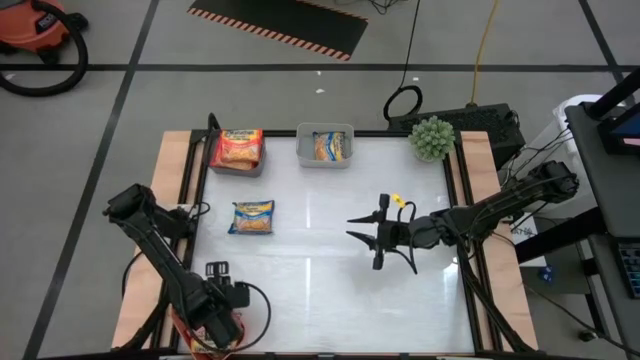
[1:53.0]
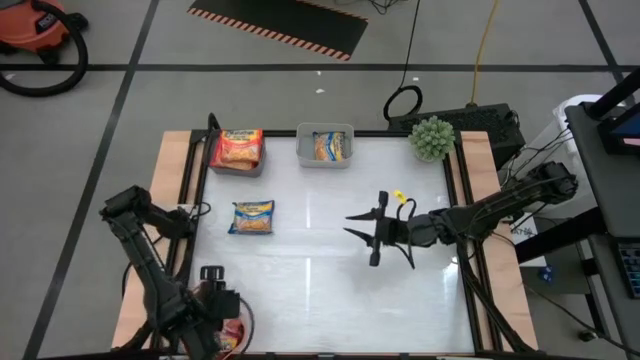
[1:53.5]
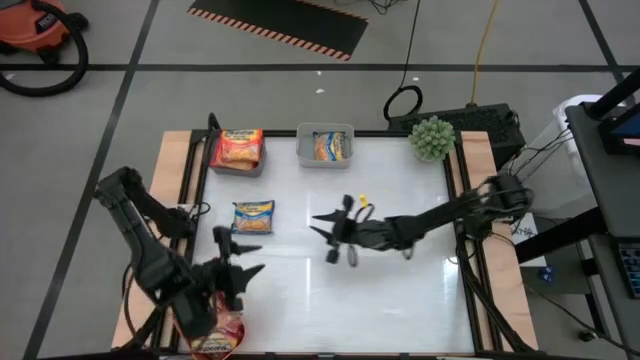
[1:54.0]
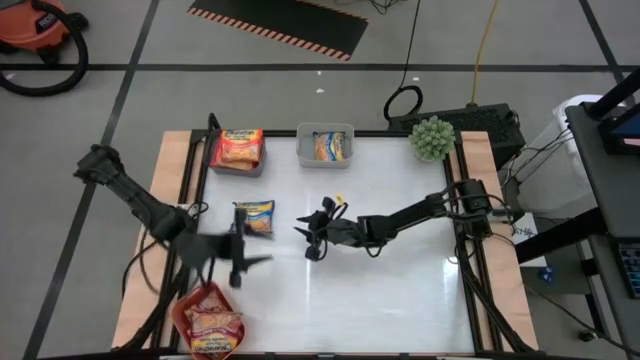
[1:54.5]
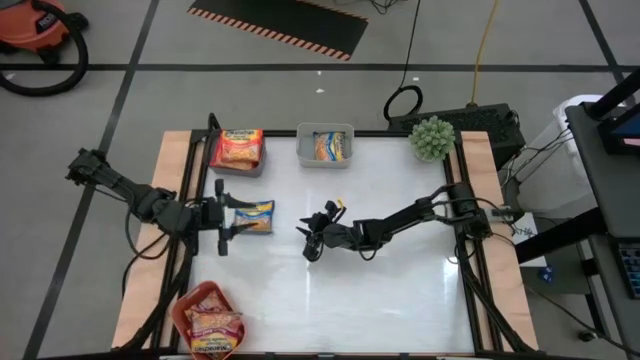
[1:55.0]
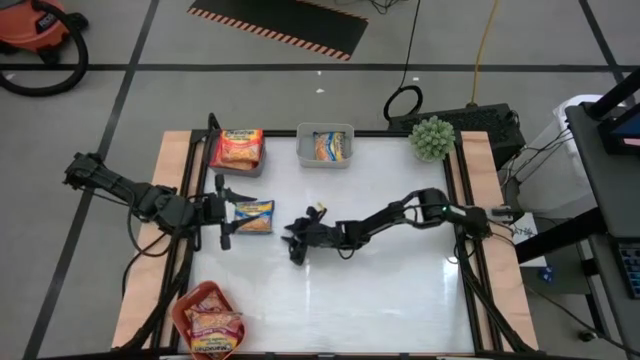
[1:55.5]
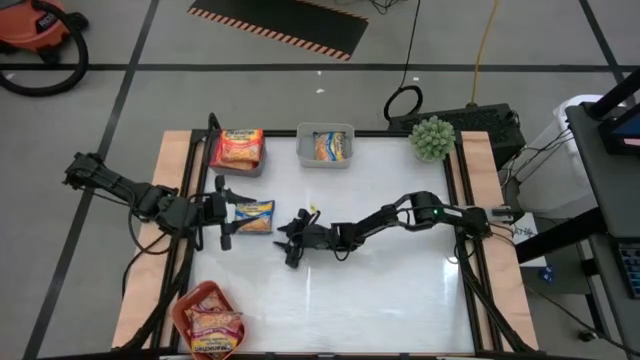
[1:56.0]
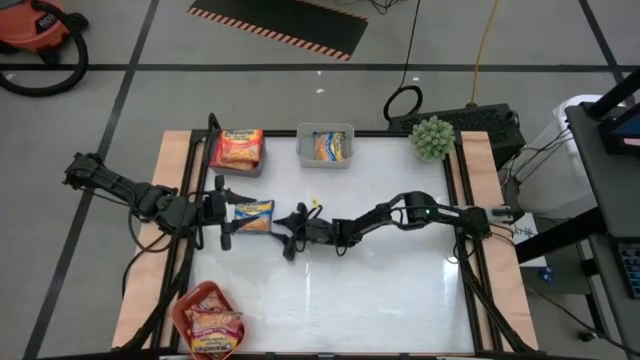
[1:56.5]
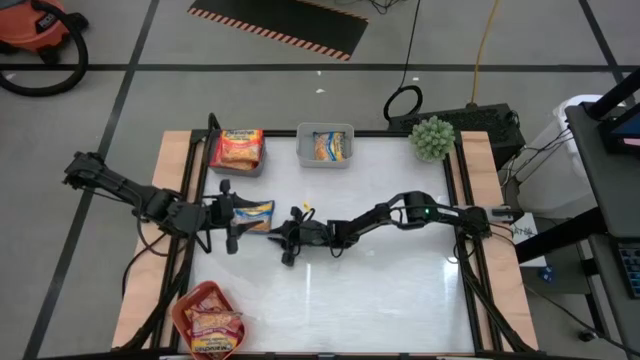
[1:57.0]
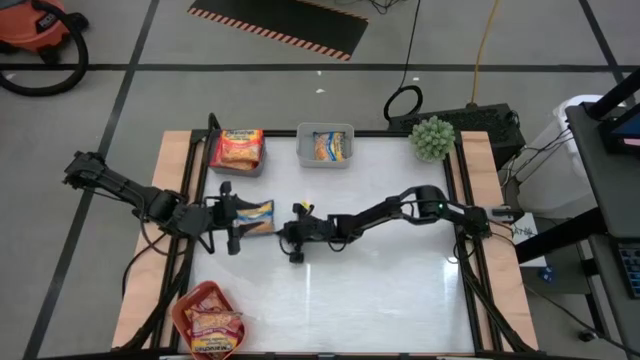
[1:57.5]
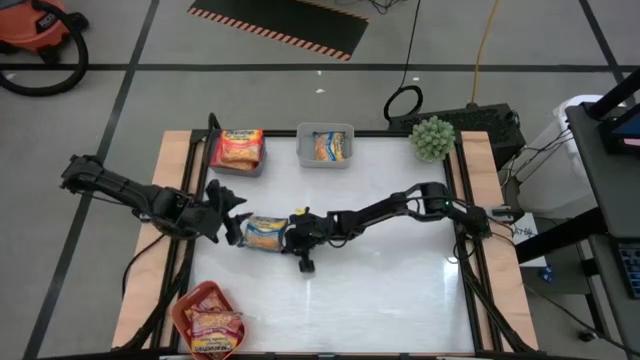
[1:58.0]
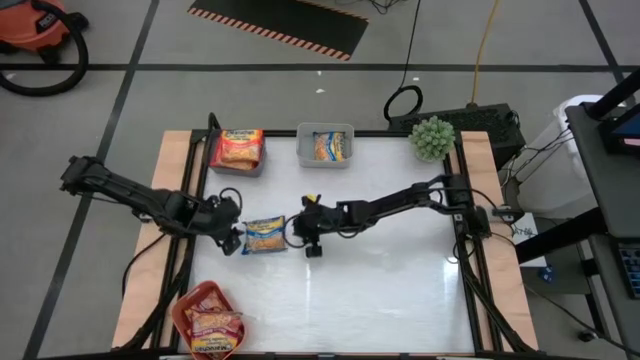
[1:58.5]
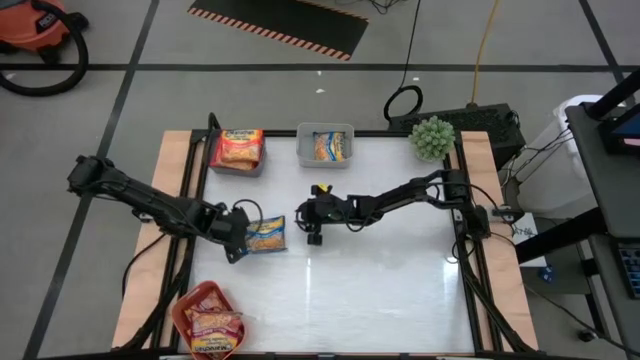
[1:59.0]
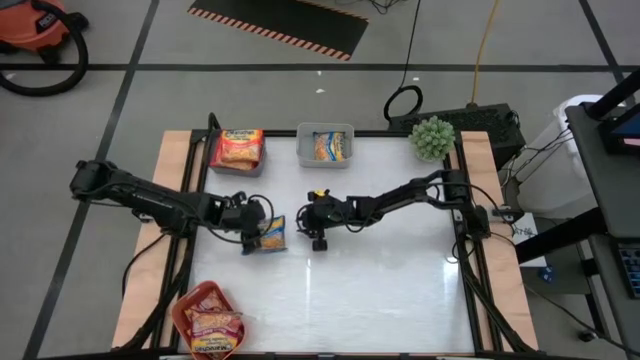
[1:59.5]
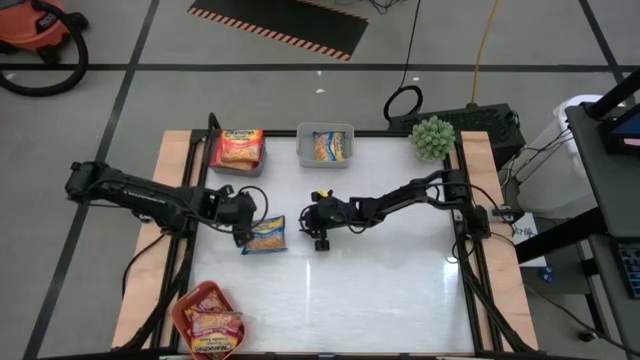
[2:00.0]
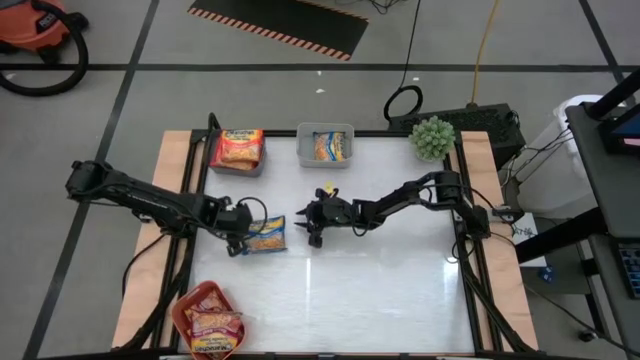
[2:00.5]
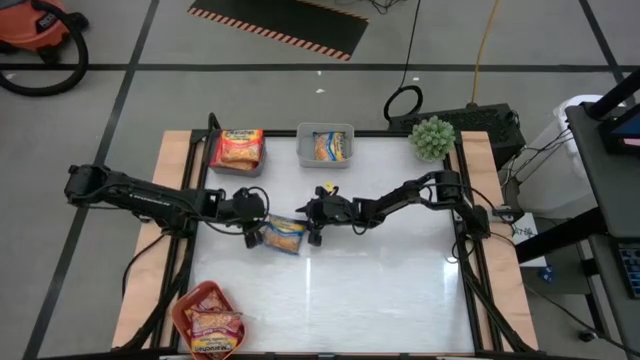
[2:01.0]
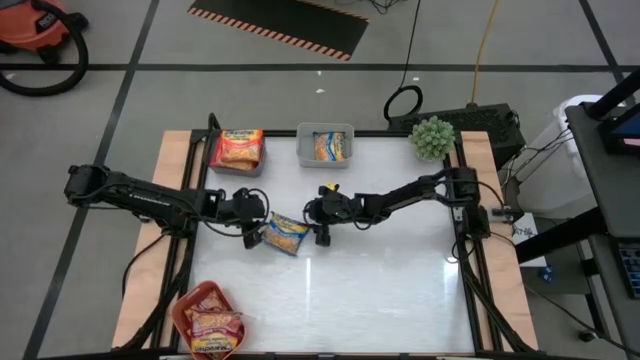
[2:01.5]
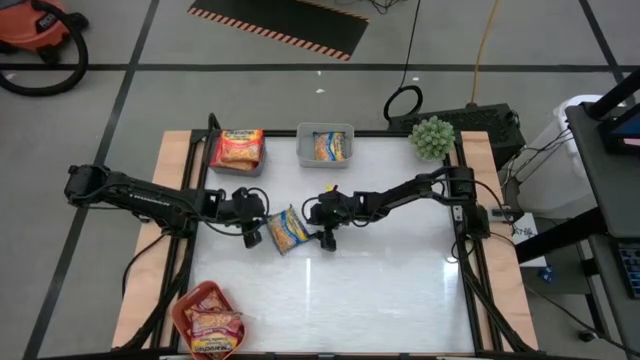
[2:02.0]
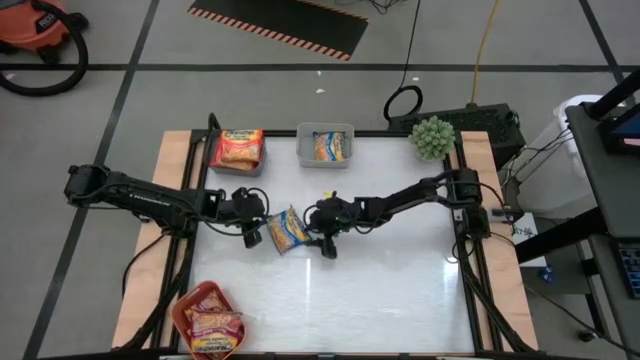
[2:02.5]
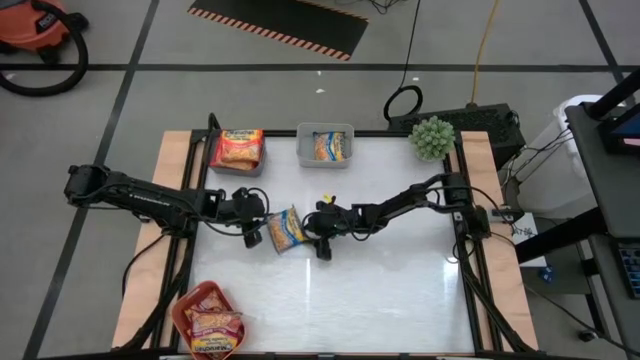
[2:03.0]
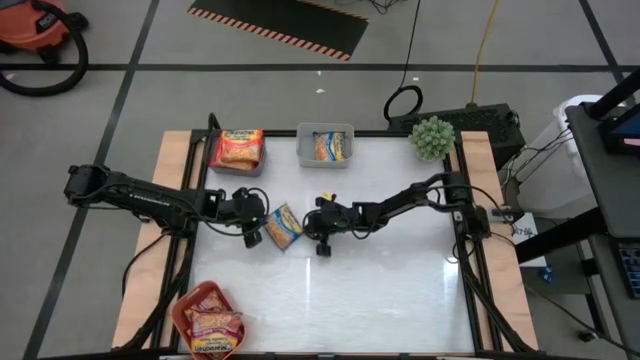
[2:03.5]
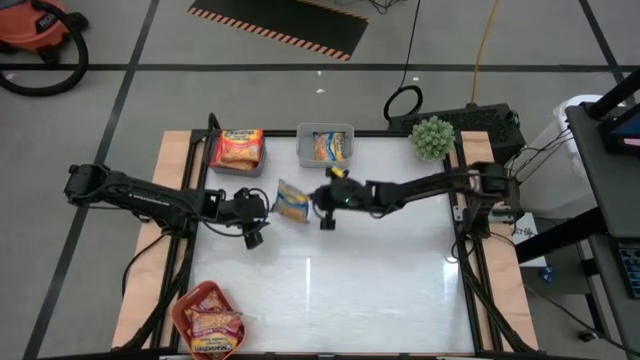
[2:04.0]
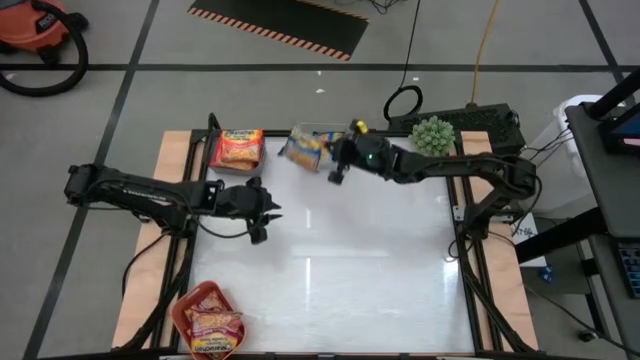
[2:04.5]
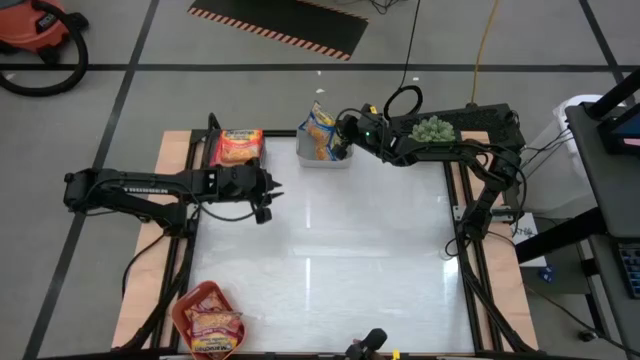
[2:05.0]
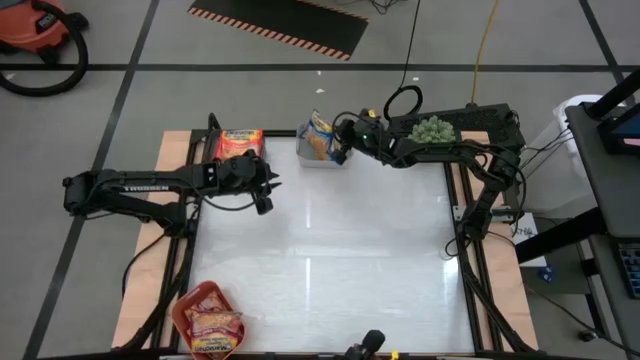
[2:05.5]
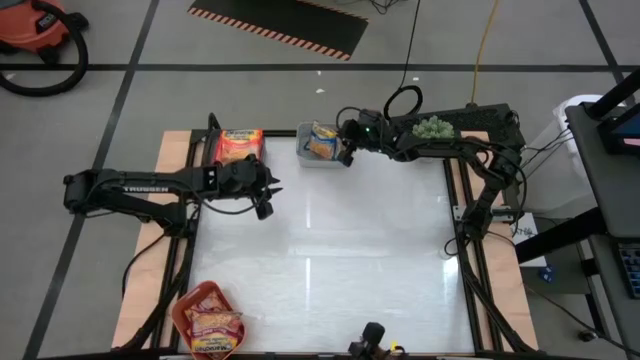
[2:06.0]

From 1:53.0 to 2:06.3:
Task: Sort Maruchan noodles
Put the blue noodle pack into the gray bin

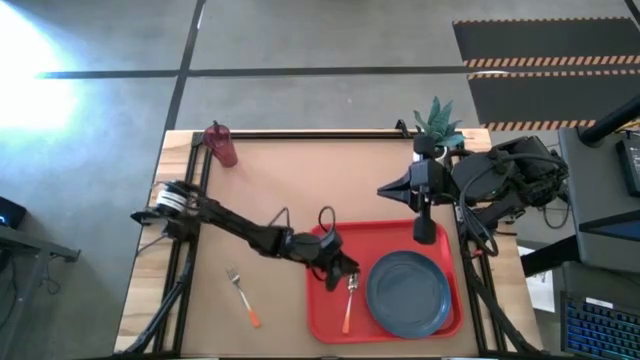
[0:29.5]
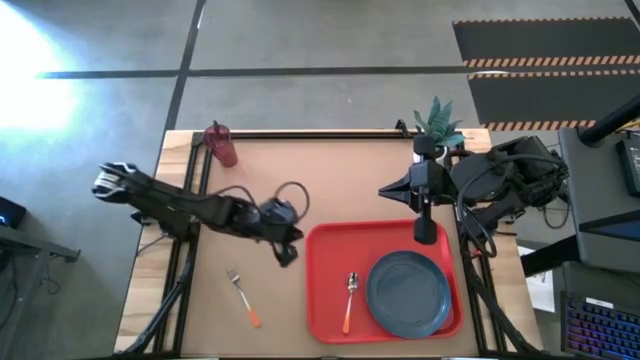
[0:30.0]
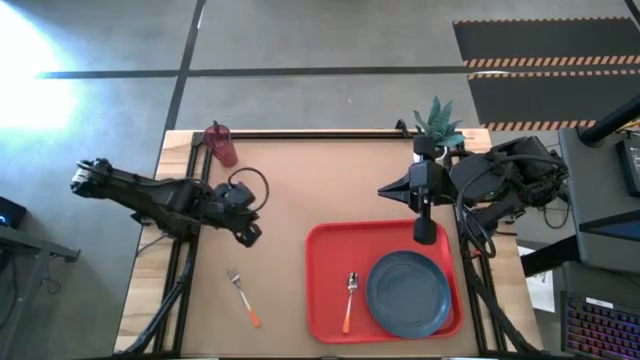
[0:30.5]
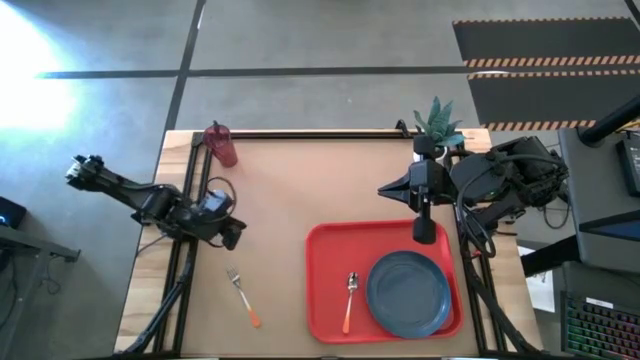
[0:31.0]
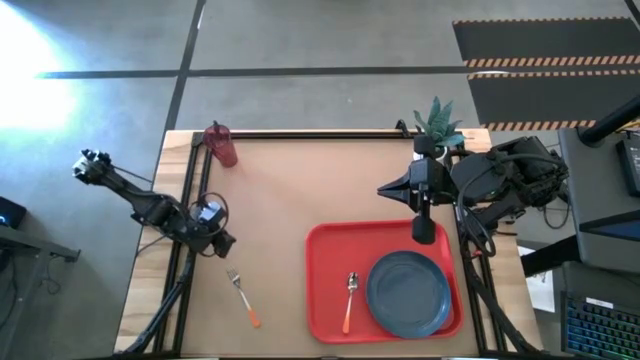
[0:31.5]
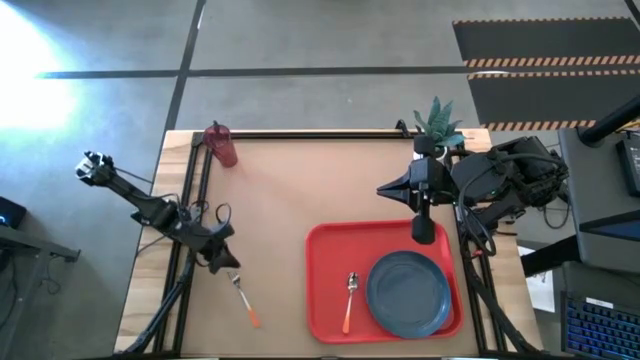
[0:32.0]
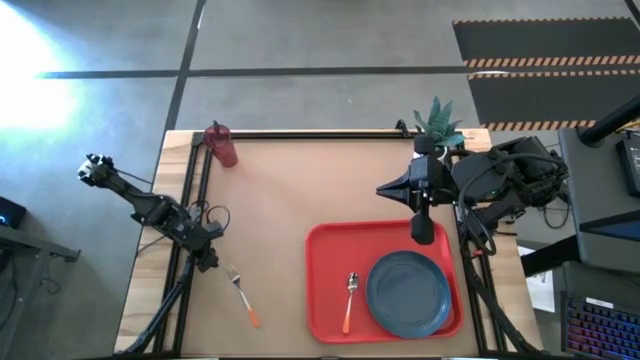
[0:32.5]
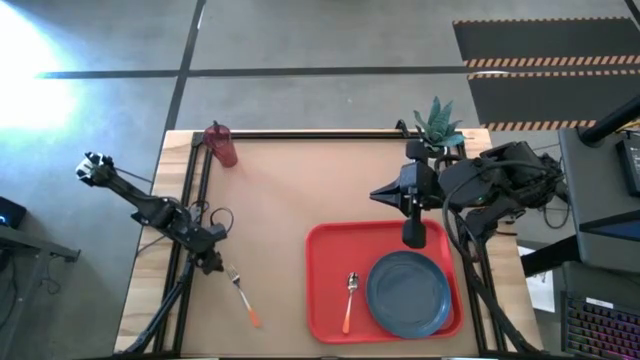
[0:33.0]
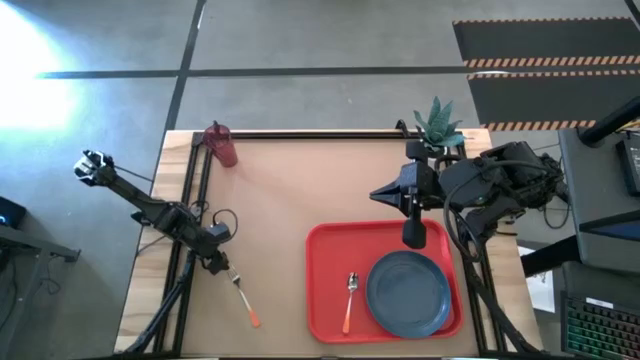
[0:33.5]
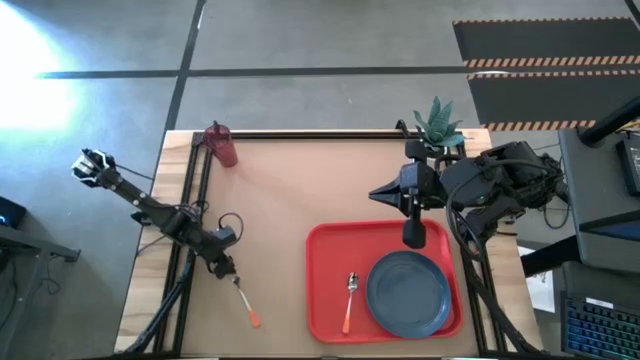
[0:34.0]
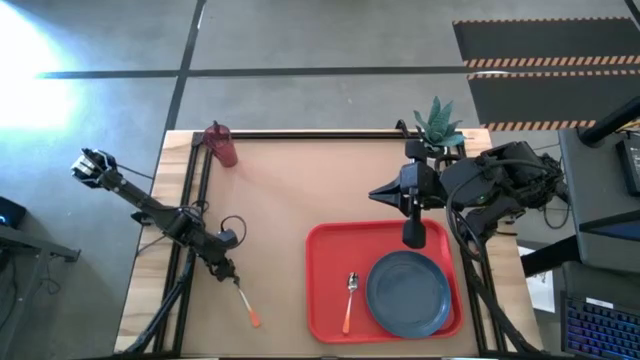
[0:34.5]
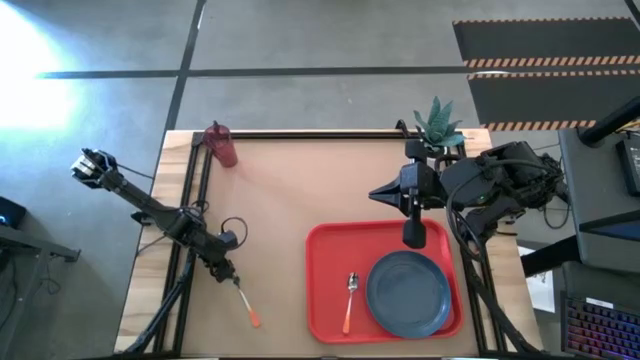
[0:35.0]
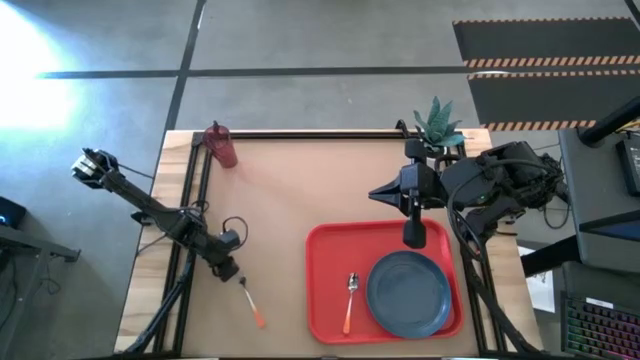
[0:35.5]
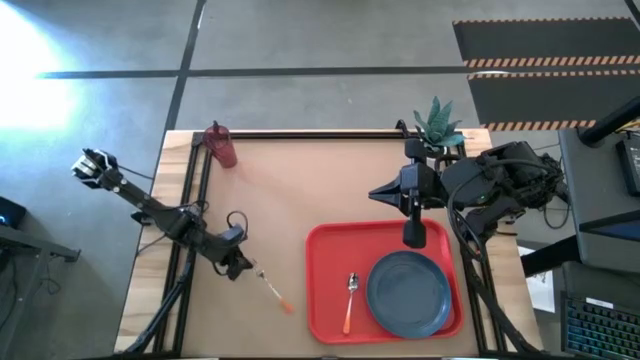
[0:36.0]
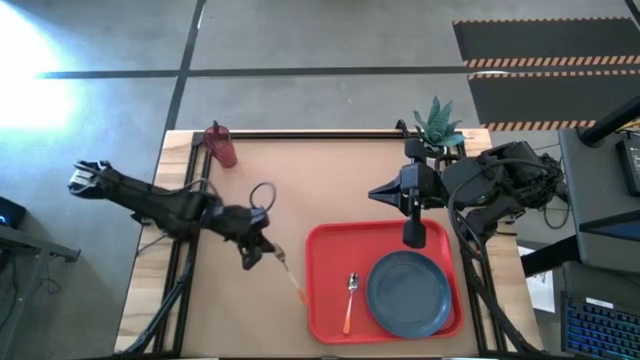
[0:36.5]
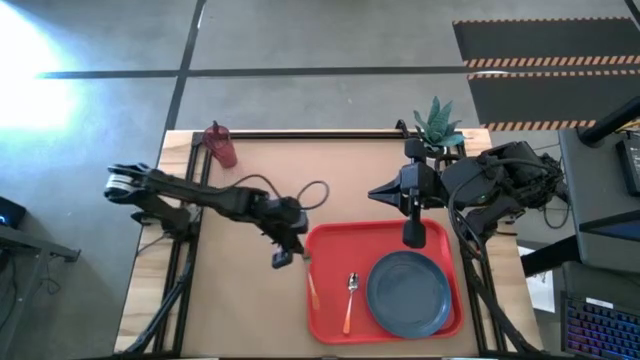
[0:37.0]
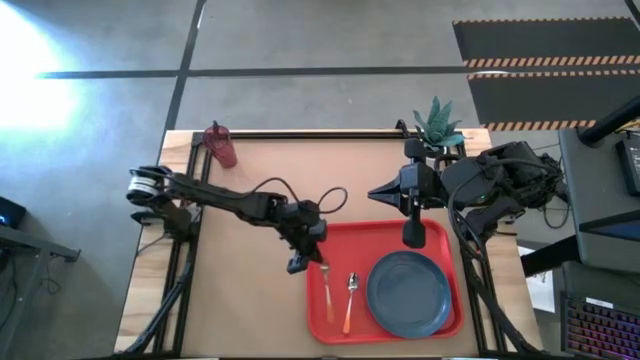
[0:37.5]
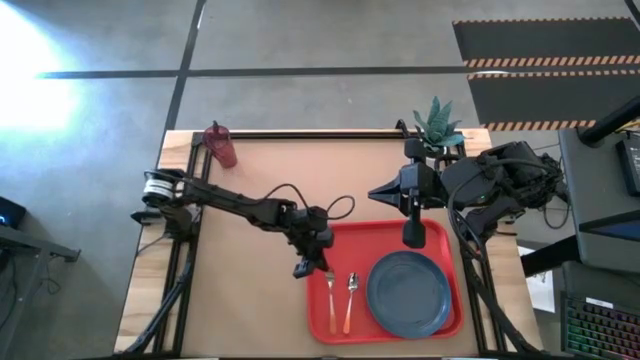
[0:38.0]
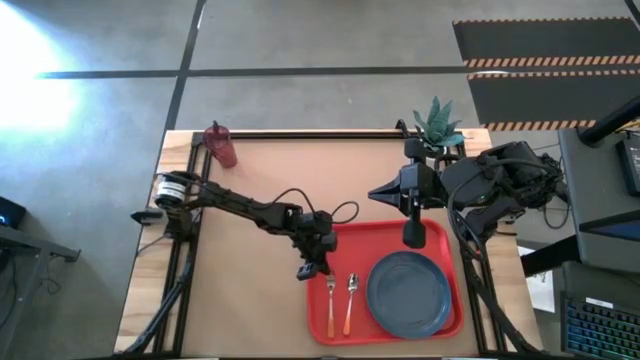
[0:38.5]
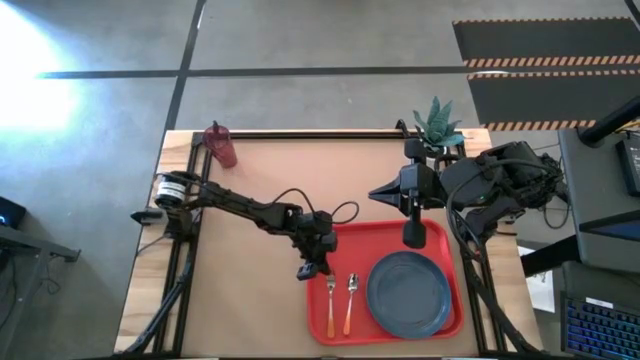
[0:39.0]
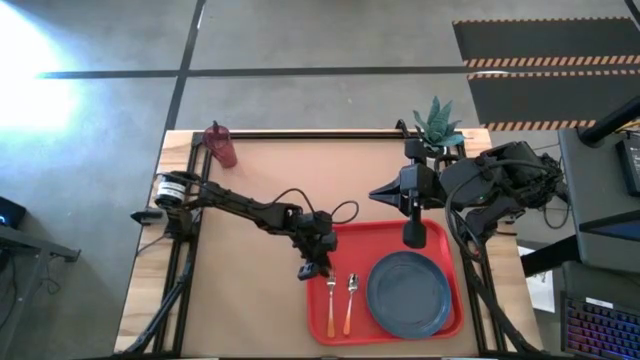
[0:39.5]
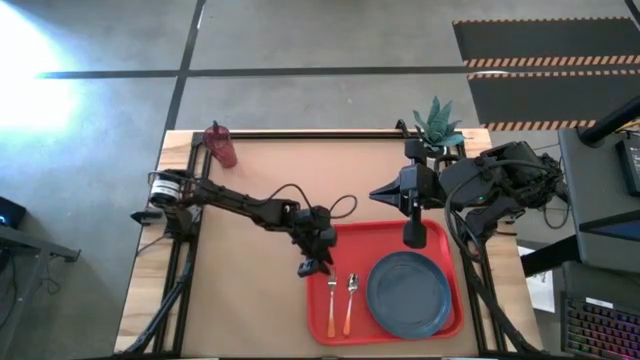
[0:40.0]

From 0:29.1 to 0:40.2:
Task: Pick and place plate/cup/fork/spoon on tray
Put the orange fork on the orange serving tray to the left of the orange spoon
